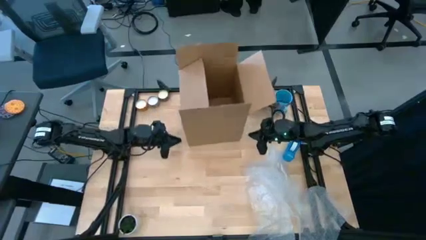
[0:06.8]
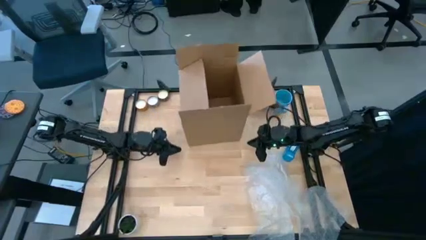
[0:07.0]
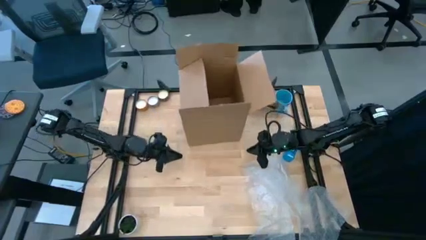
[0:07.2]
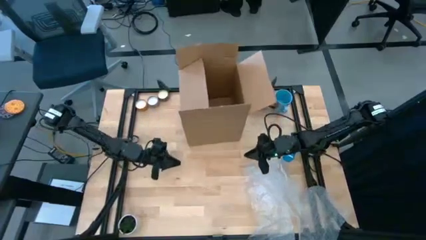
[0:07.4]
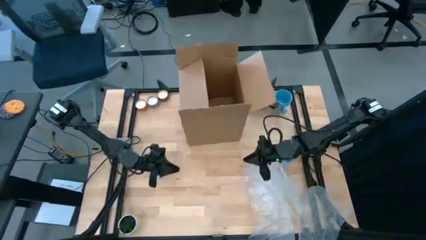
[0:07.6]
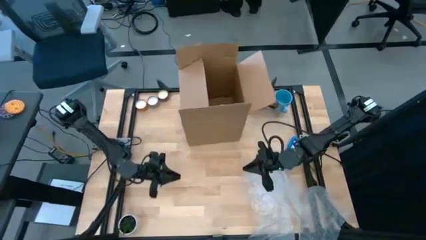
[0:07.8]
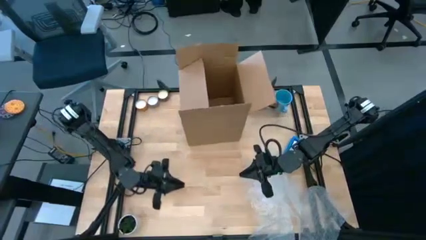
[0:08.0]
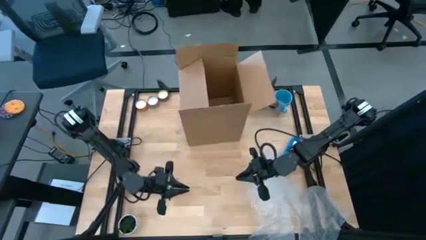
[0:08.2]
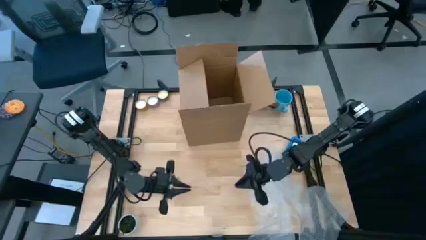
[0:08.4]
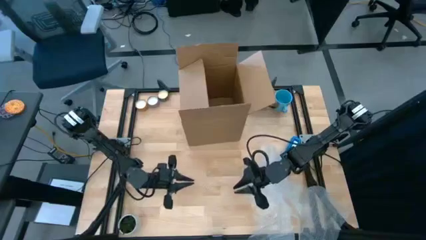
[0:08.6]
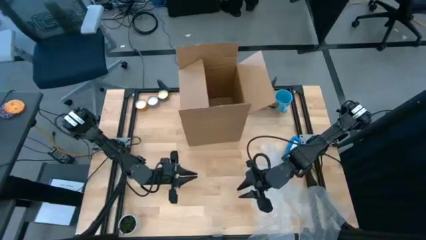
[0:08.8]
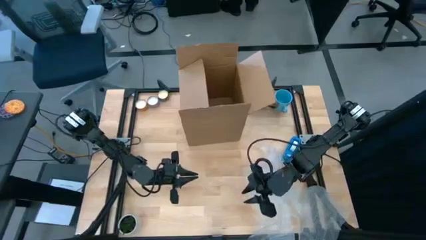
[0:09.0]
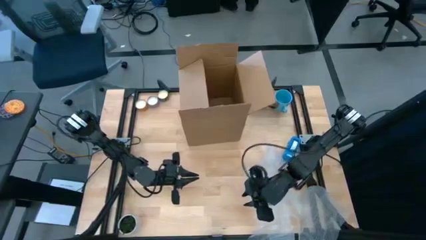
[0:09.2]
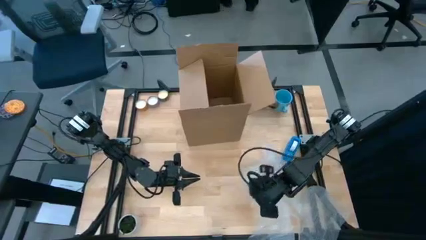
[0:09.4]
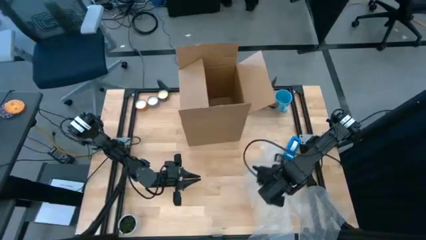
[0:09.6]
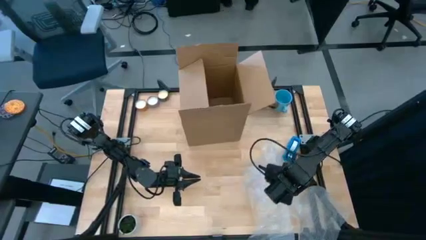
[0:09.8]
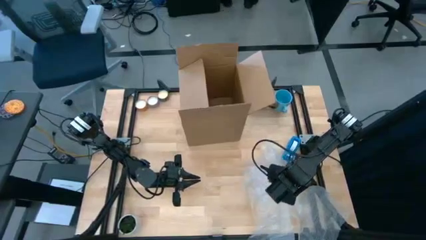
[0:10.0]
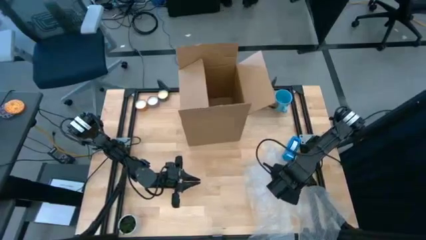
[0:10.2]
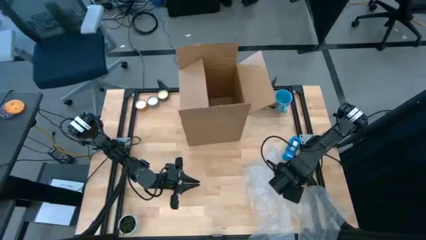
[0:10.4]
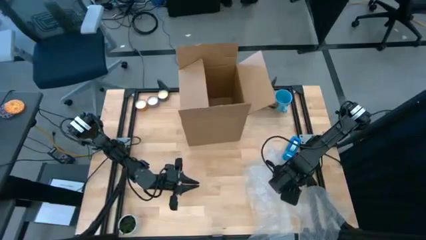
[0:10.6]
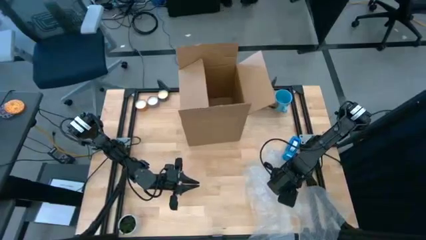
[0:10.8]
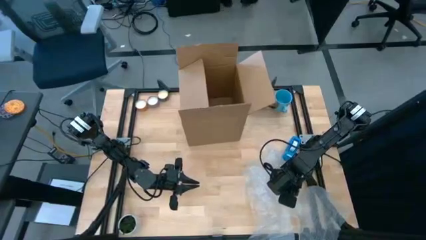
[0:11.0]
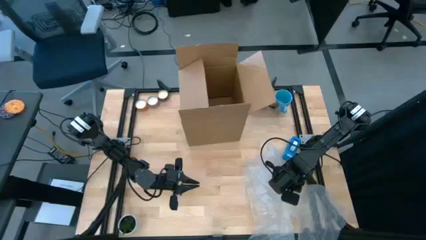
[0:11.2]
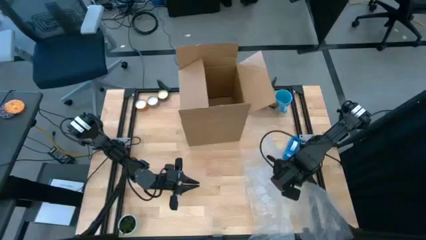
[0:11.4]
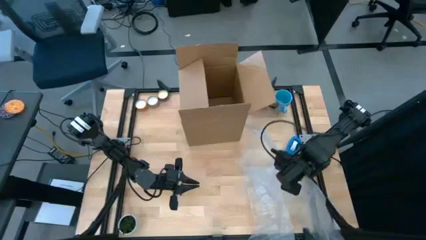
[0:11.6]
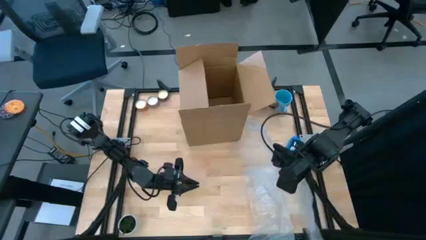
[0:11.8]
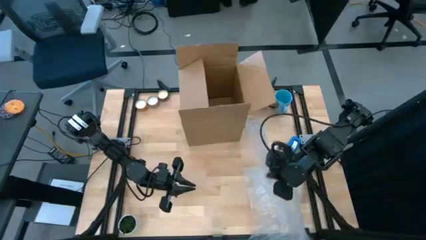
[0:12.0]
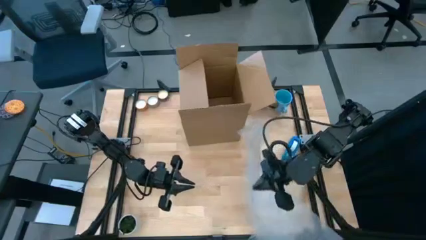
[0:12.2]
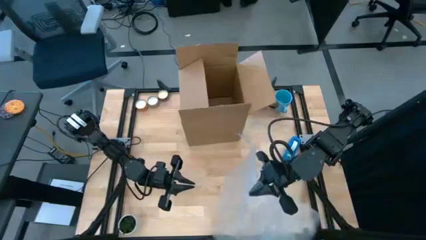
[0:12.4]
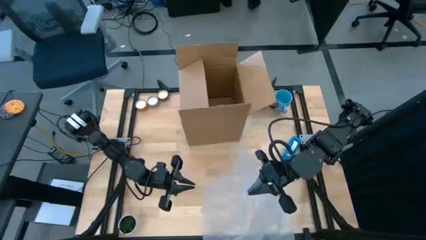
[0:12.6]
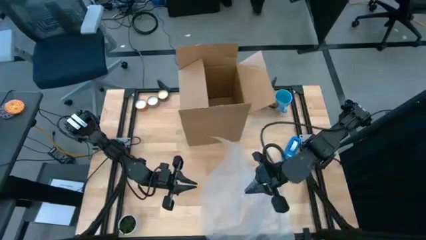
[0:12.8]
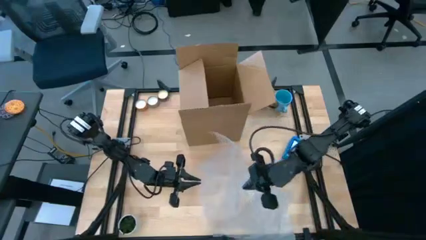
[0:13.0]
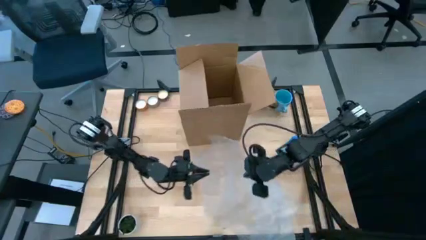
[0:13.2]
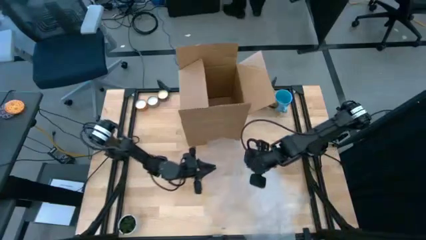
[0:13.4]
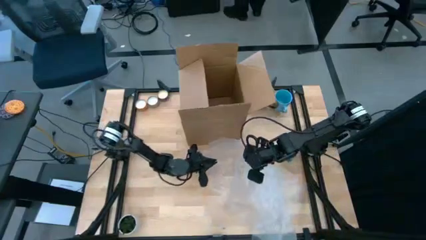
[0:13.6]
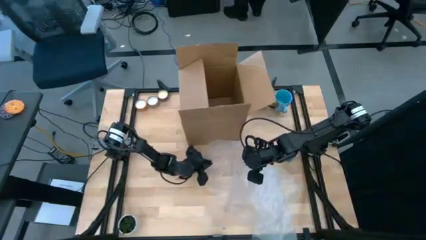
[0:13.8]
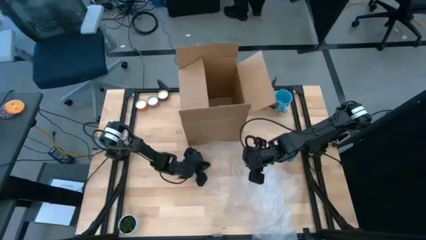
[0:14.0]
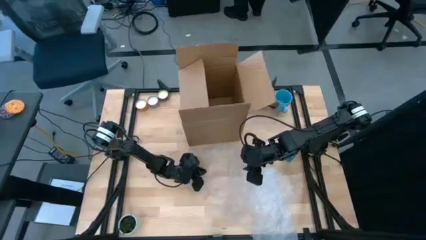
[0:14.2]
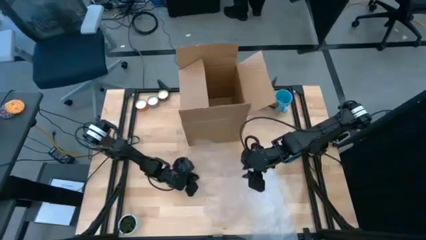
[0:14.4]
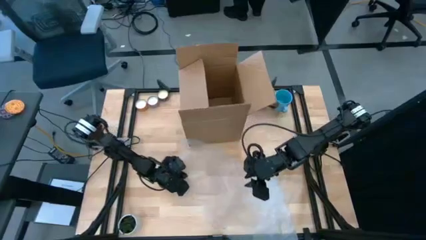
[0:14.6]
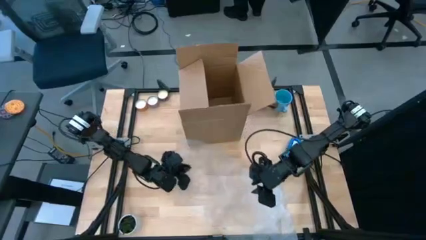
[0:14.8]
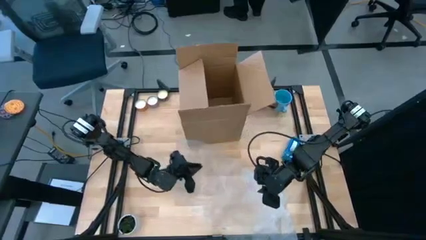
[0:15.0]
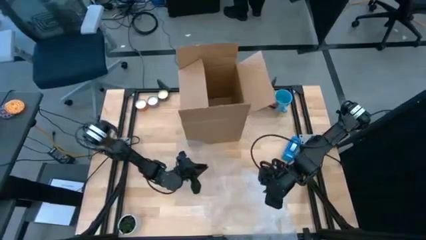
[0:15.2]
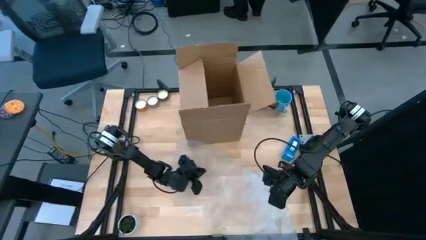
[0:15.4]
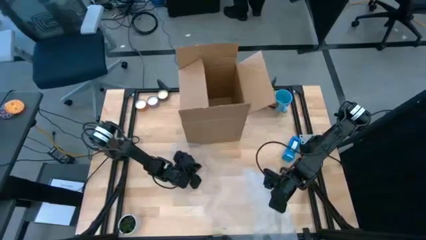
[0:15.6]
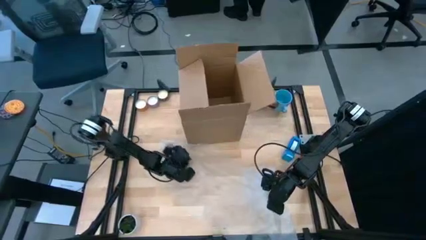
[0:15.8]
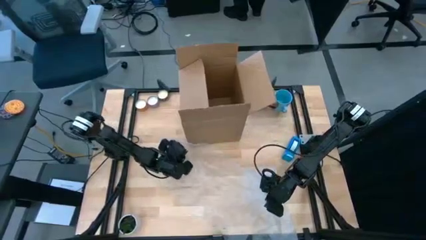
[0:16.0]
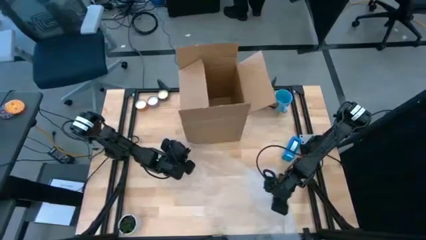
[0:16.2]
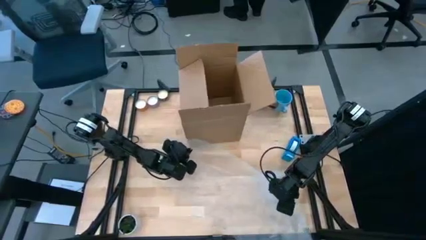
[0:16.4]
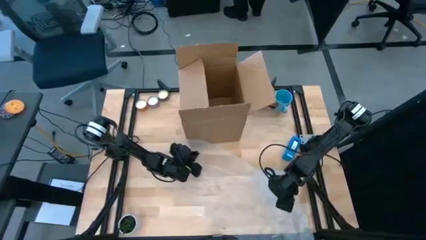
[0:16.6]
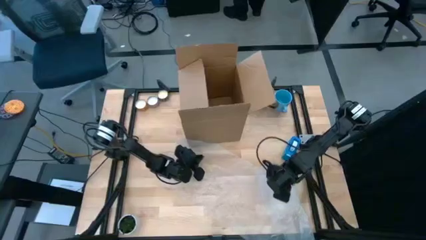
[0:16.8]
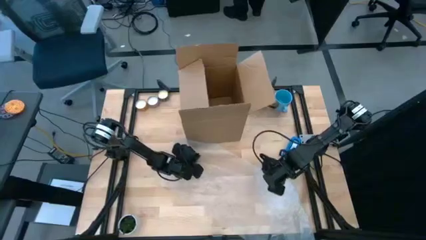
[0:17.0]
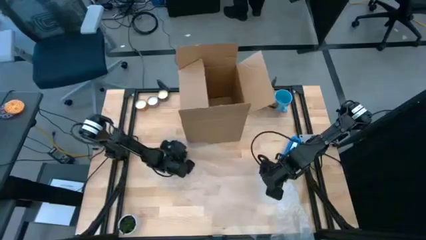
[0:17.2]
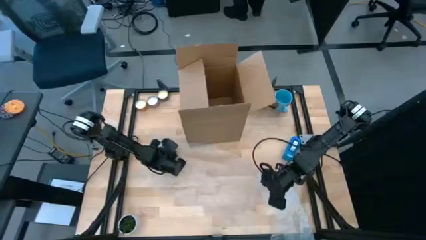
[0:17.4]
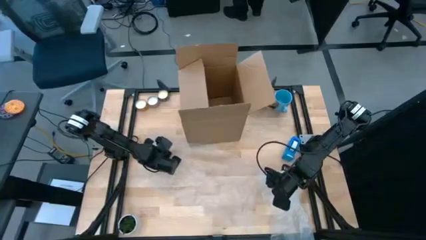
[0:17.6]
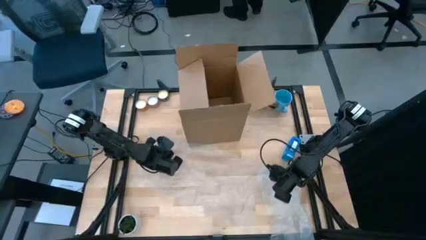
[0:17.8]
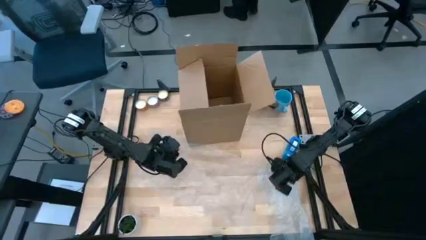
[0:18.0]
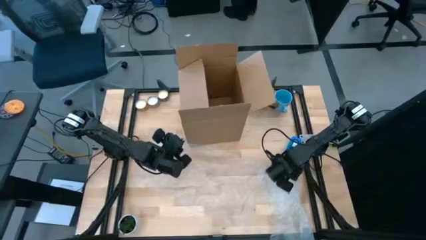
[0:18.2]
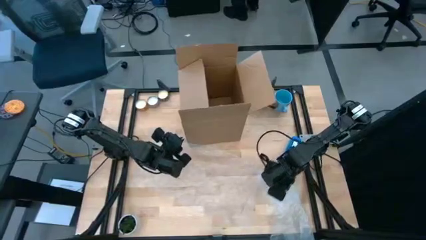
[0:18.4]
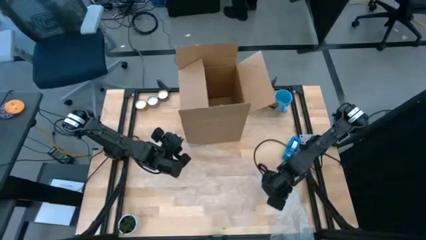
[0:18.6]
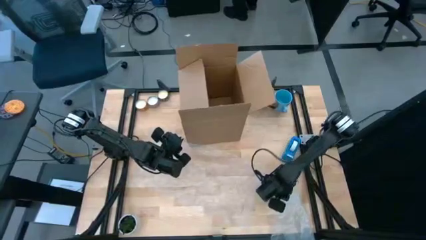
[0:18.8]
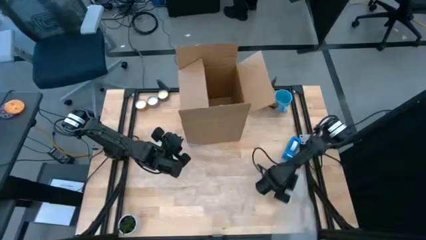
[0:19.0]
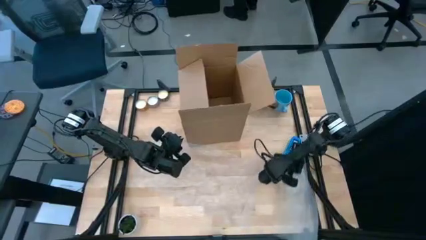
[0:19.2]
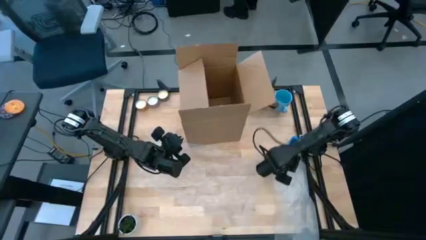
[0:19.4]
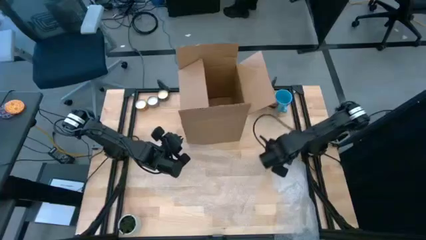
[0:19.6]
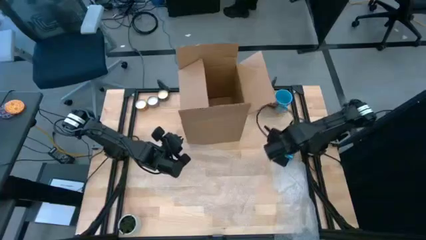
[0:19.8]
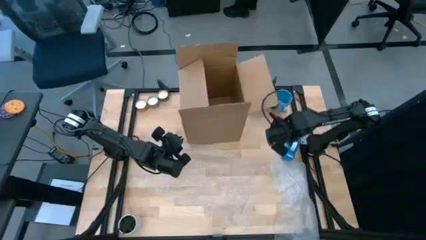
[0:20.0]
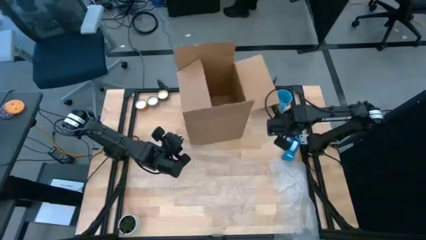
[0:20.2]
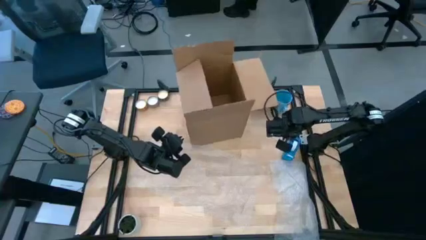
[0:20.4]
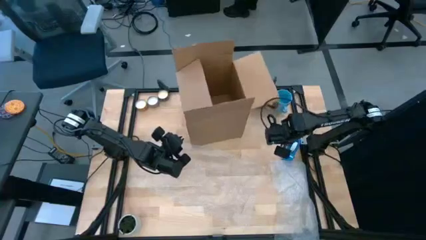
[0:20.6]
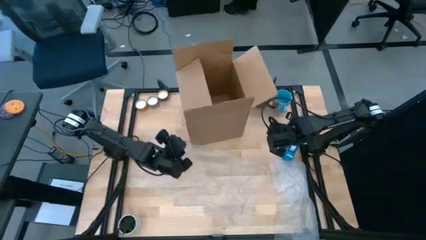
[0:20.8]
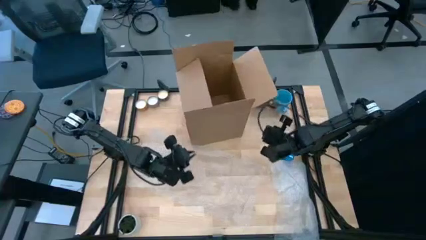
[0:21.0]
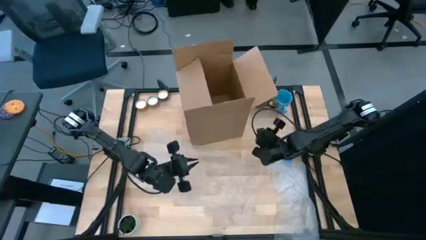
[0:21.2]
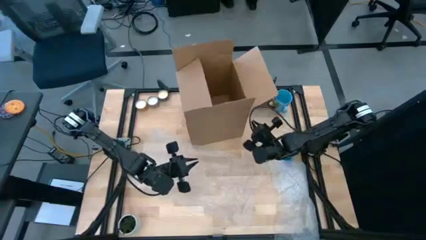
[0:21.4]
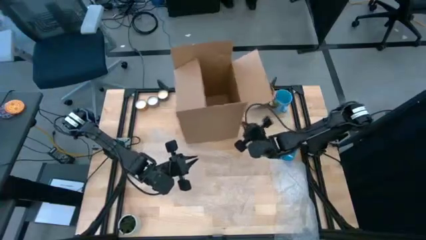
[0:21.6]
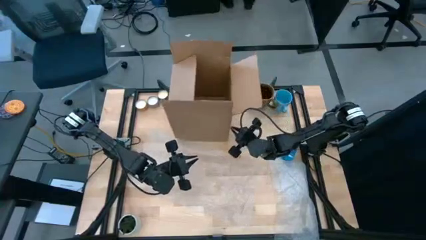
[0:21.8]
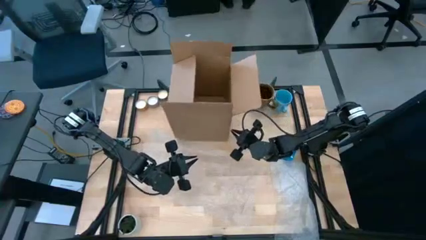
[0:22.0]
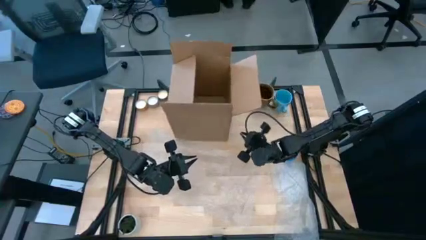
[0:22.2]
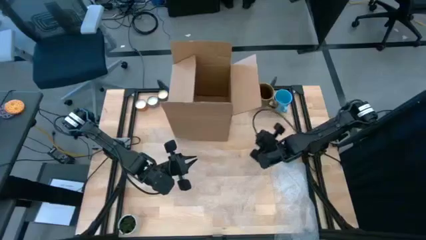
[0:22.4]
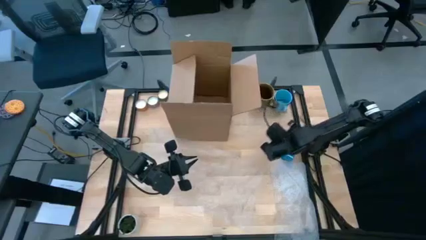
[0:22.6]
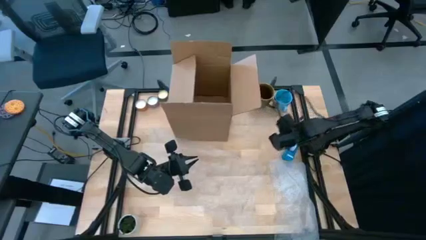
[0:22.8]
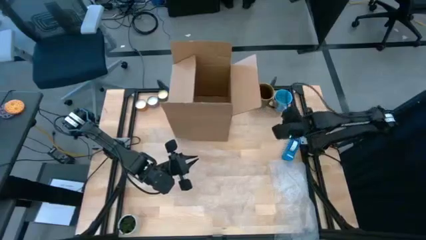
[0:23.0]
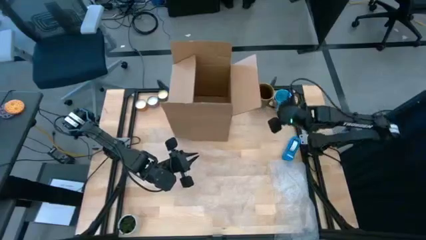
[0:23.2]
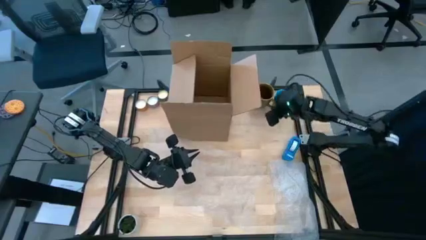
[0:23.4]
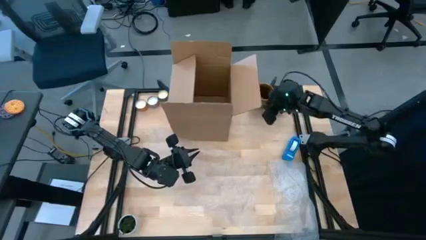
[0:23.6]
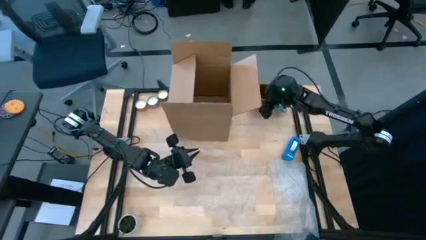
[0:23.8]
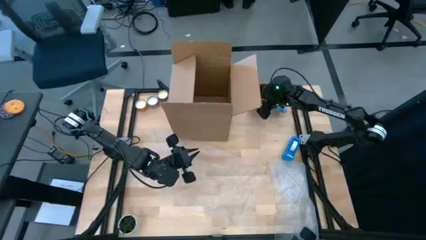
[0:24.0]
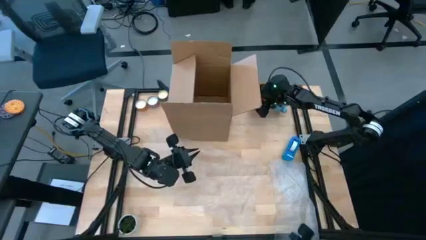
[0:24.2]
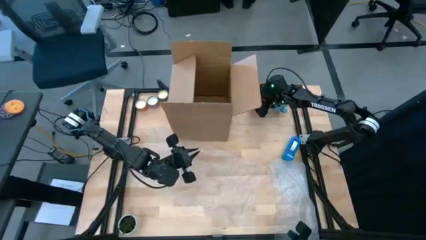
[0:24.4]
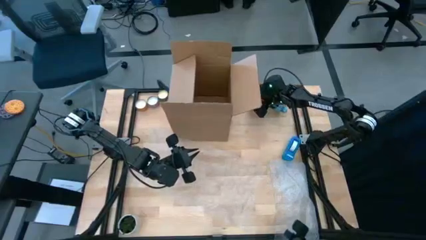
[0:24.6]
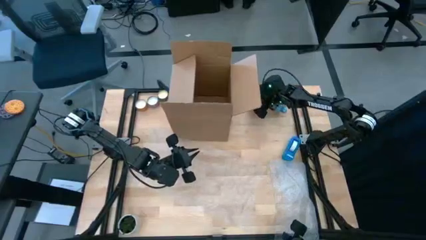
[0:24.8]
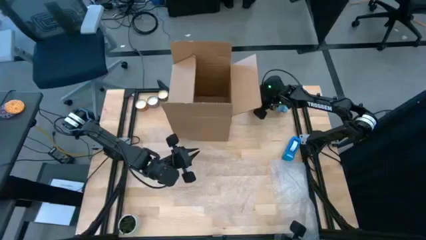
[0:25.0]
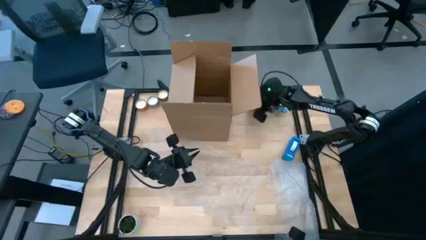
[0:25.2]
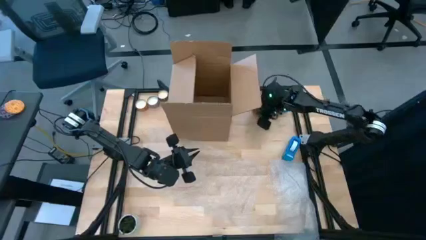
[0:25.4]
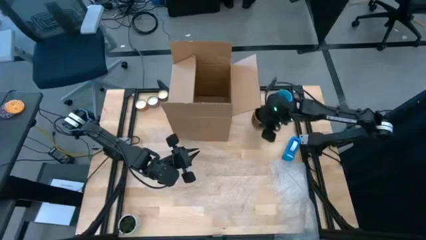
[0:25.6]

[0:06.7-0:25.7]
Task: wrap mug
Wrap the brown cup with bubble wrap
